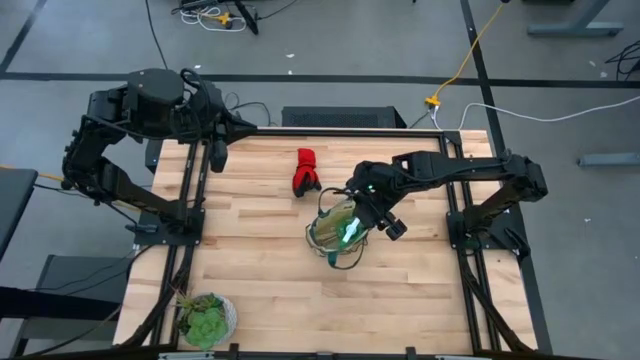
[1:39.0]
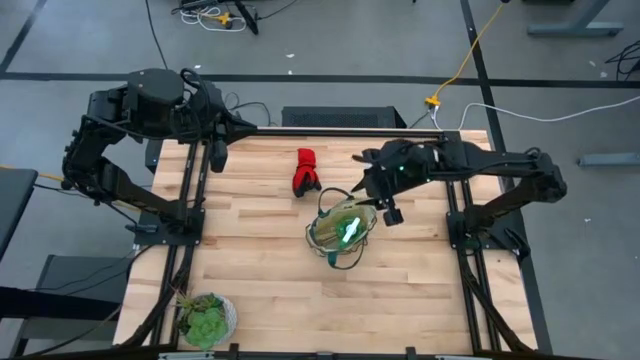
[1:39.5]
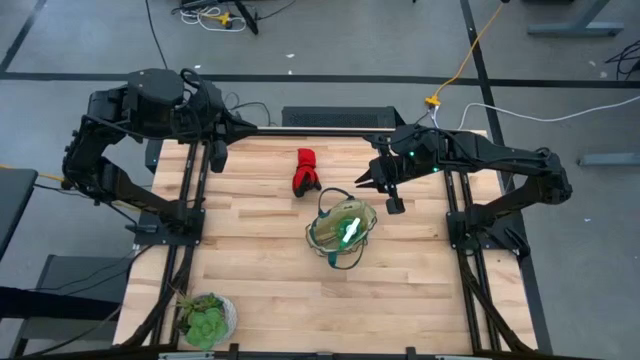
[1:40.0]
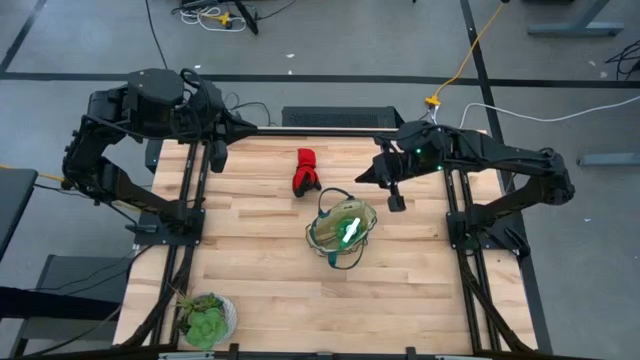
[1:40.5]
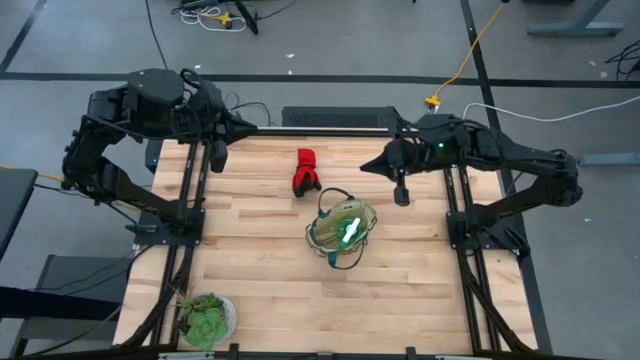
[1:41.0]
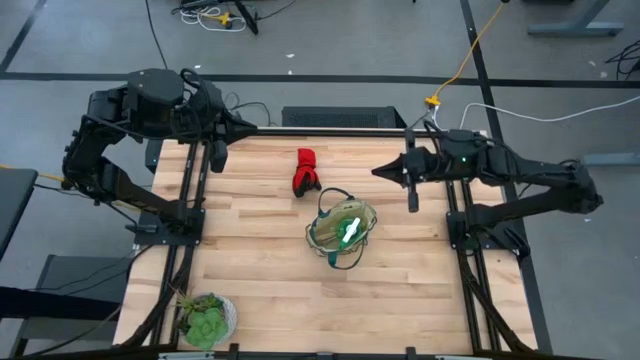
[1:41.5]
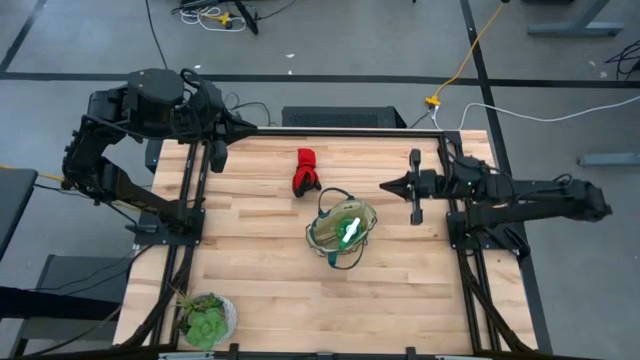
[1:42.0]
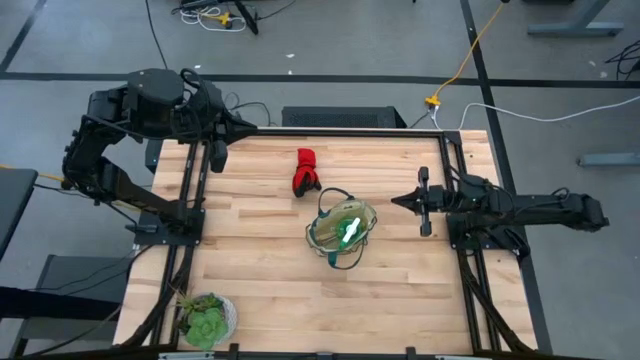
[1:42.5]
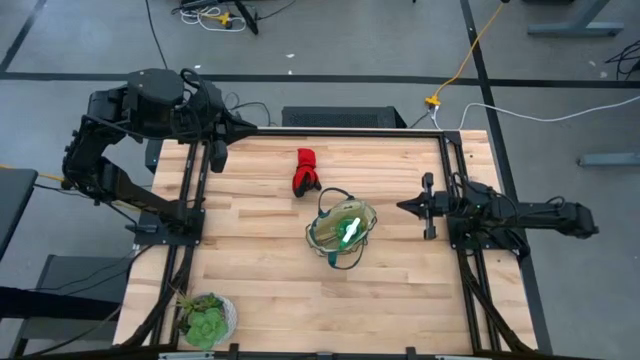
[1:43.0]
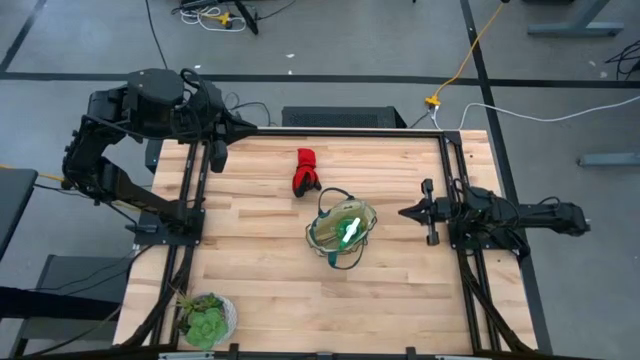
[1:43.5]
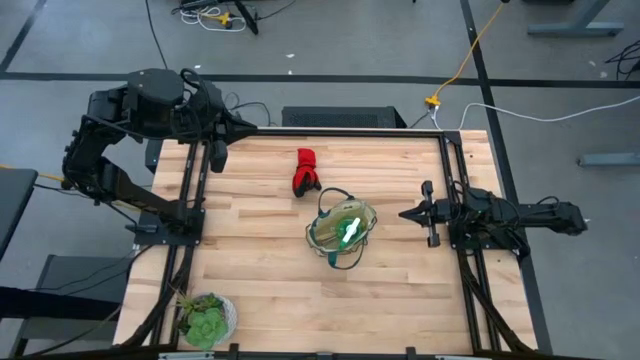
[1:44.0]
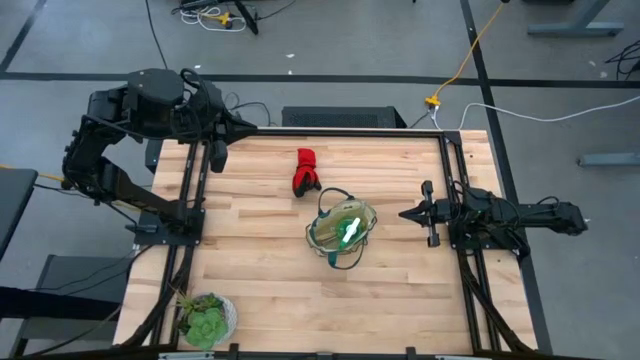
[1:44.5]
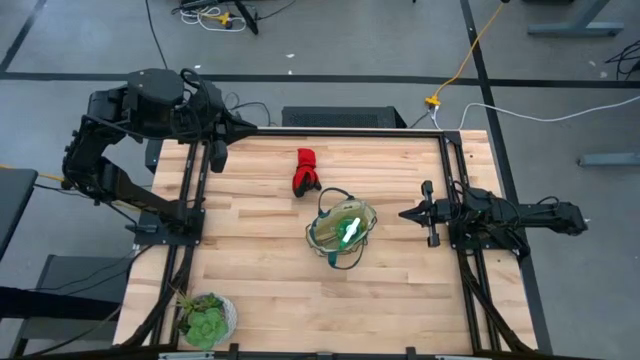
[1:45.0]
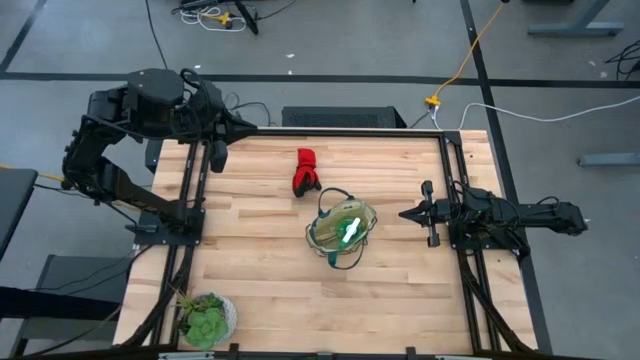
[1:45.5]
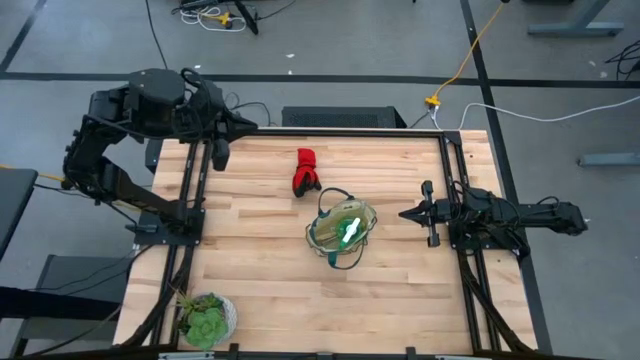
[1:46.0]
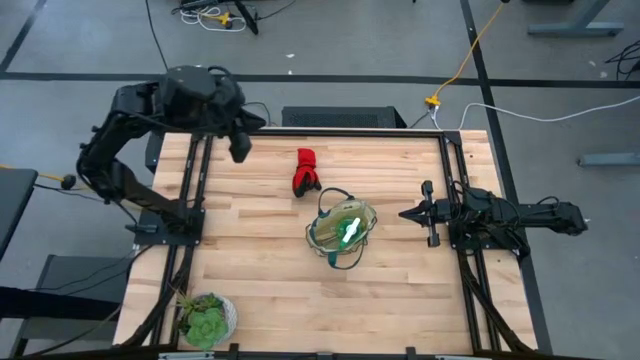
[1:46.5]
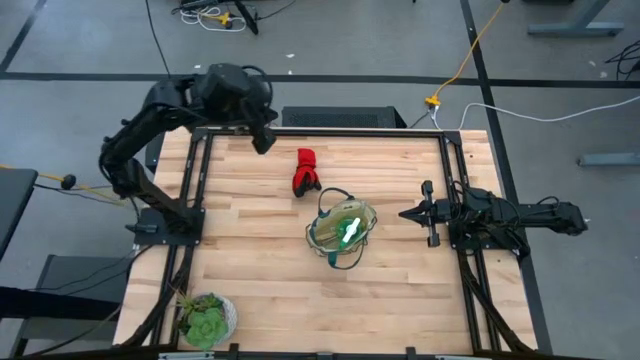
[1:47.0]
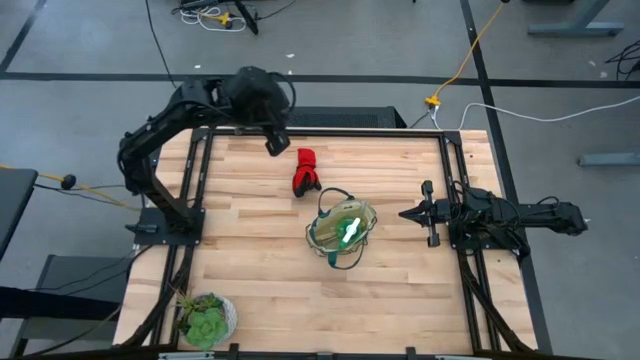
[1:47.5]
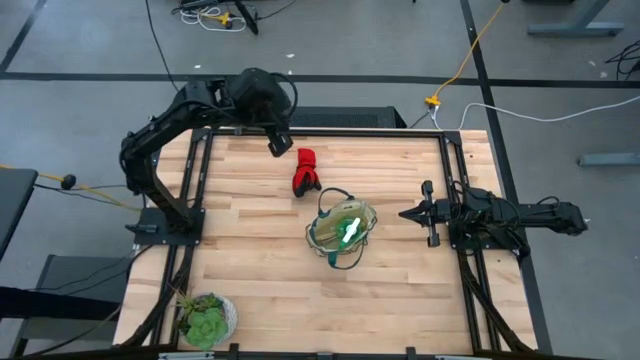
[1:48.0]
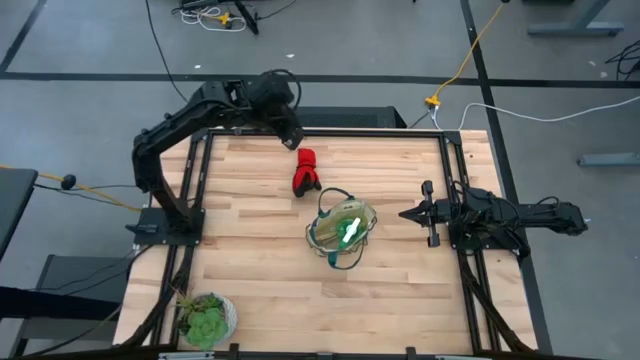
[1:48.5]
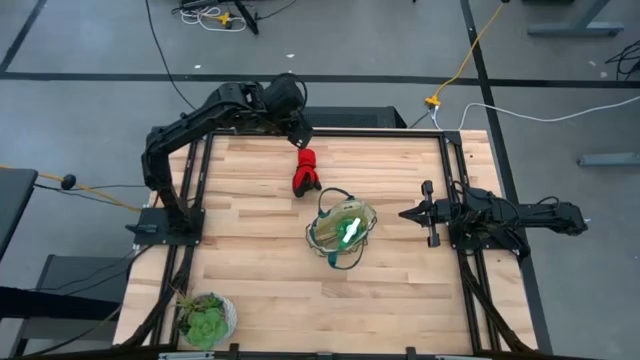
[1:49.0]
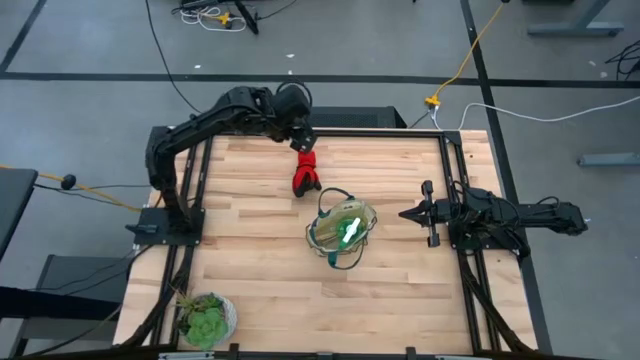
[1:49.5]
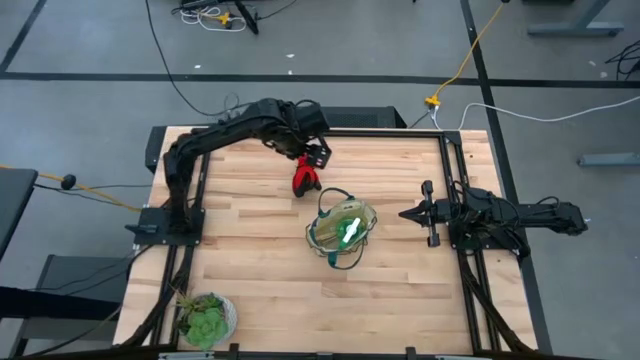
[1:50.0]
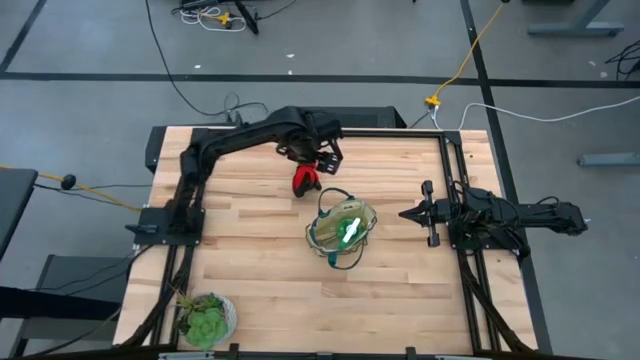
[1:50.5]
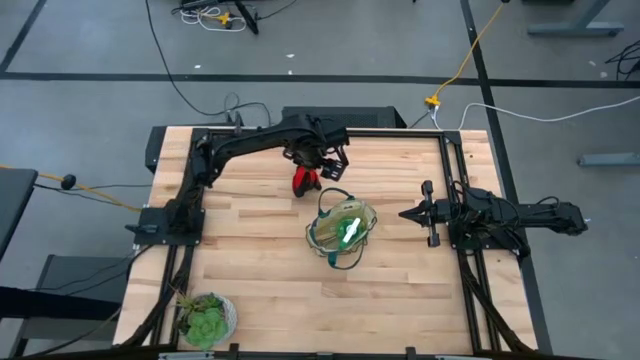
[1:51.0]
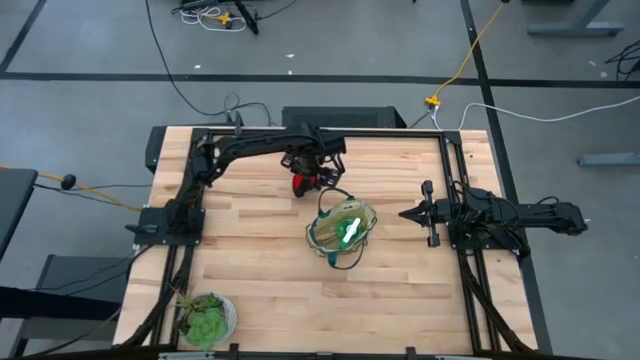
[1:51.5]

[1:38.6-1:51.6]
Task: Pick & Place Garden tools in Gardening bag
Put the red gloves into the light brown and green gardening bag

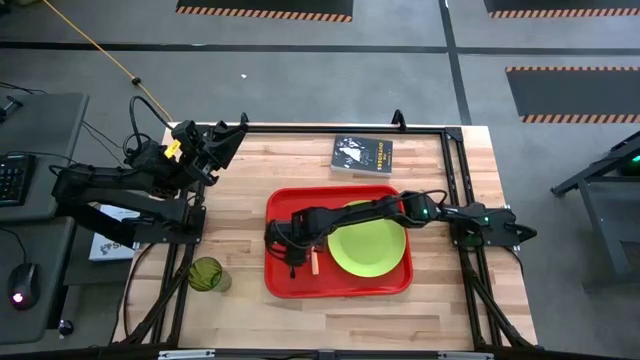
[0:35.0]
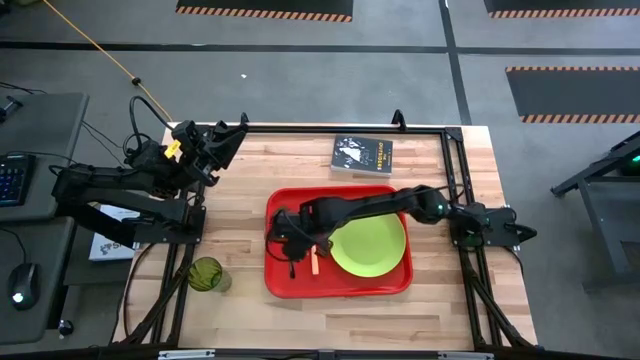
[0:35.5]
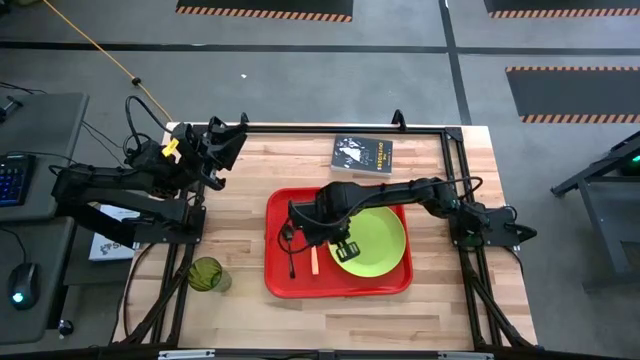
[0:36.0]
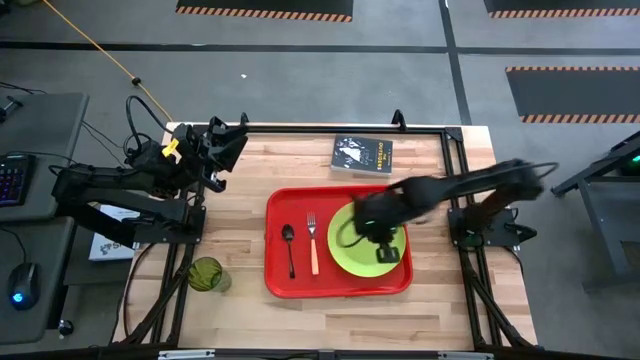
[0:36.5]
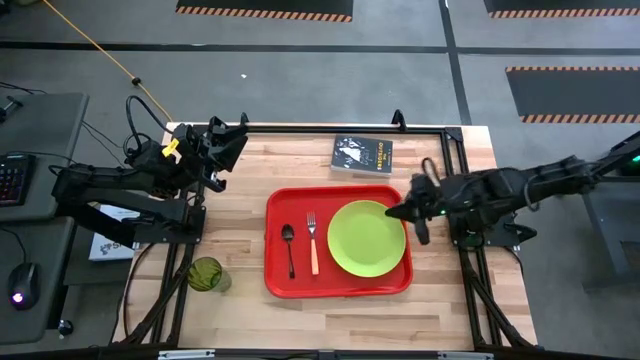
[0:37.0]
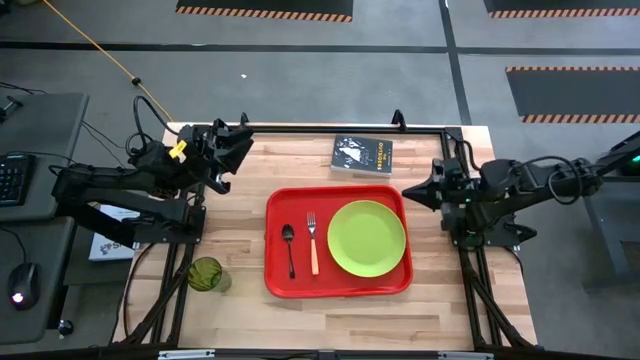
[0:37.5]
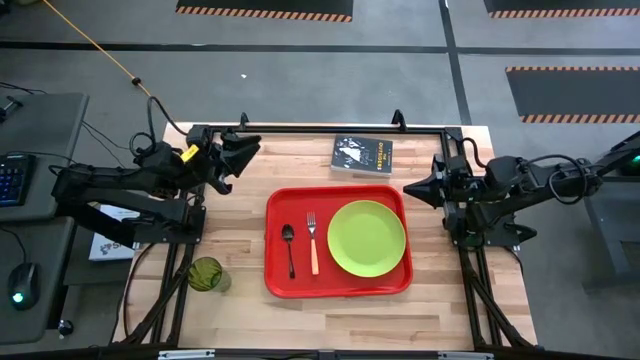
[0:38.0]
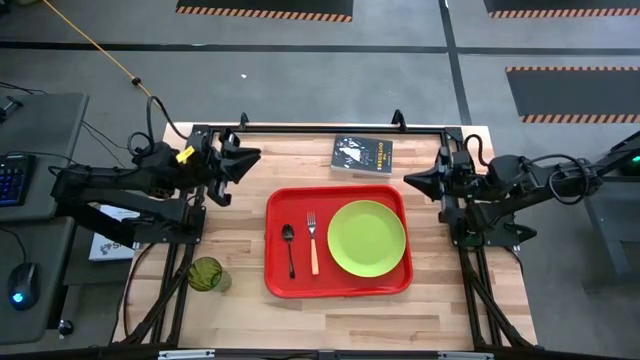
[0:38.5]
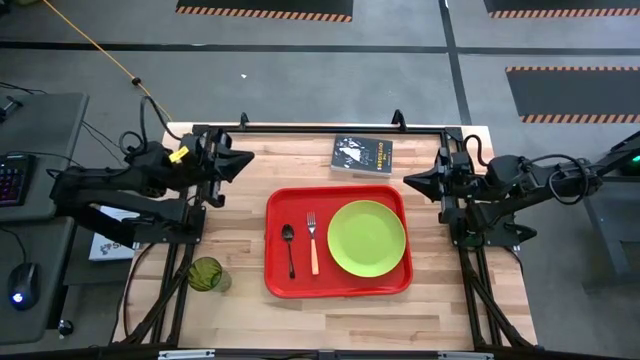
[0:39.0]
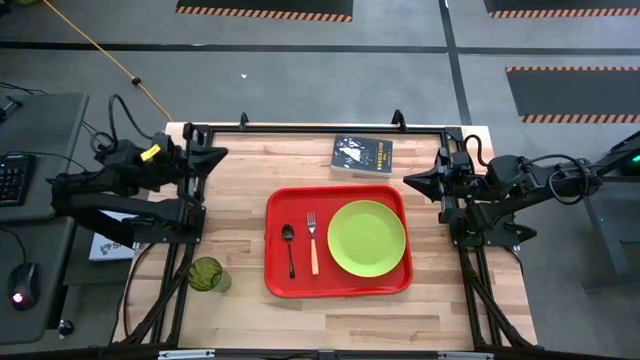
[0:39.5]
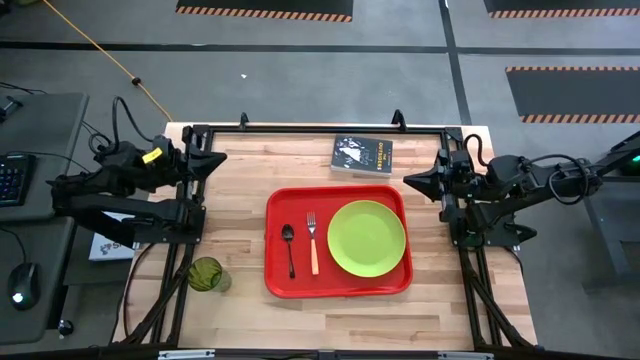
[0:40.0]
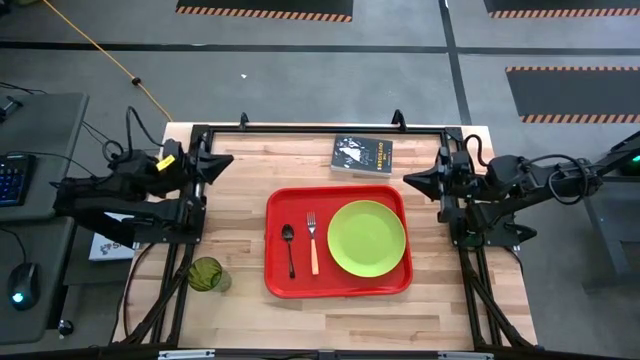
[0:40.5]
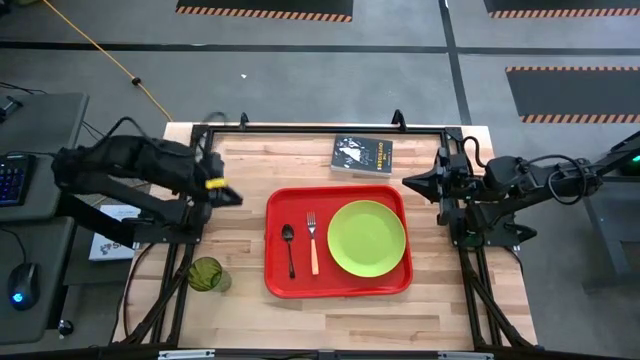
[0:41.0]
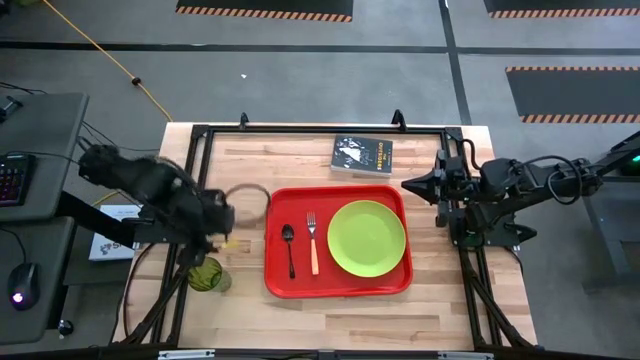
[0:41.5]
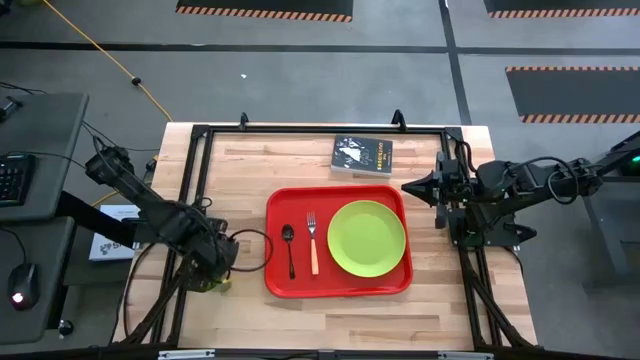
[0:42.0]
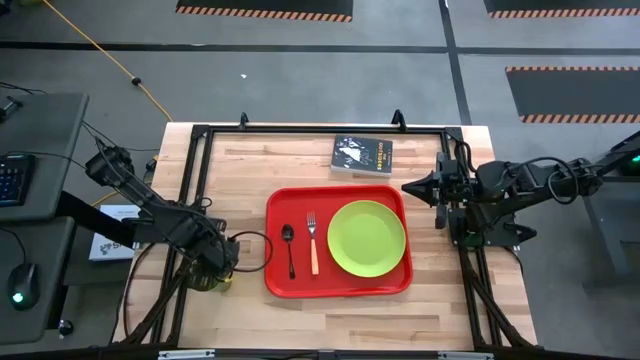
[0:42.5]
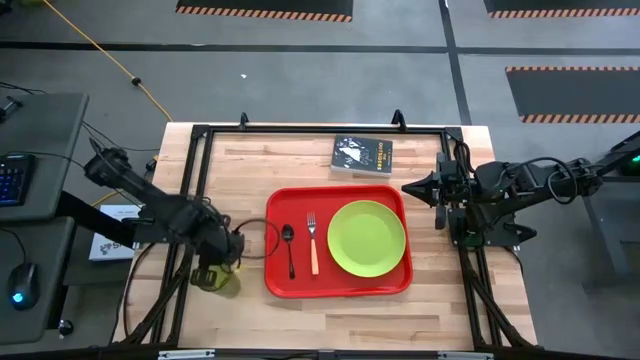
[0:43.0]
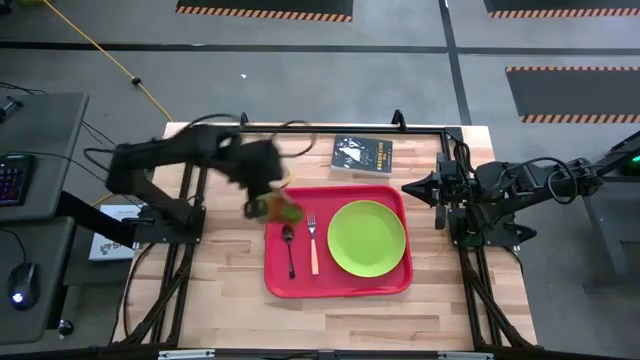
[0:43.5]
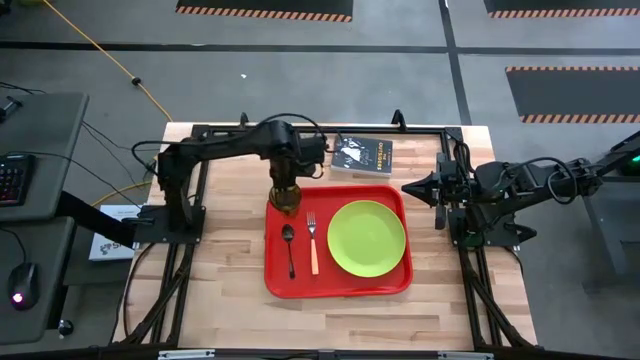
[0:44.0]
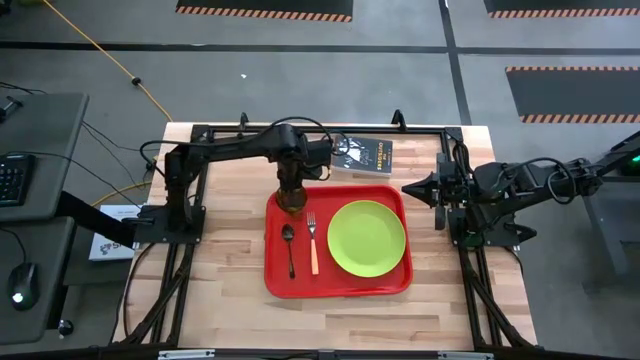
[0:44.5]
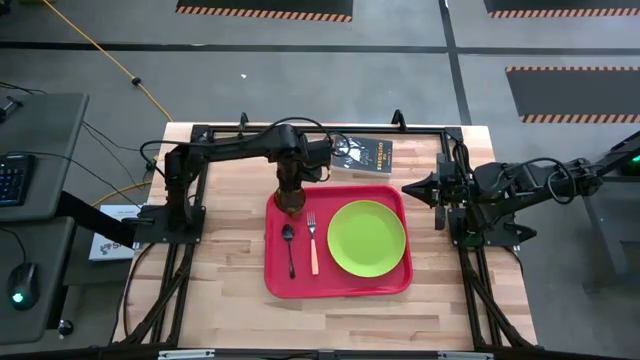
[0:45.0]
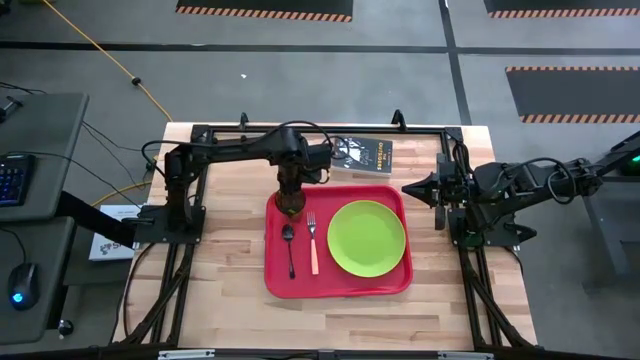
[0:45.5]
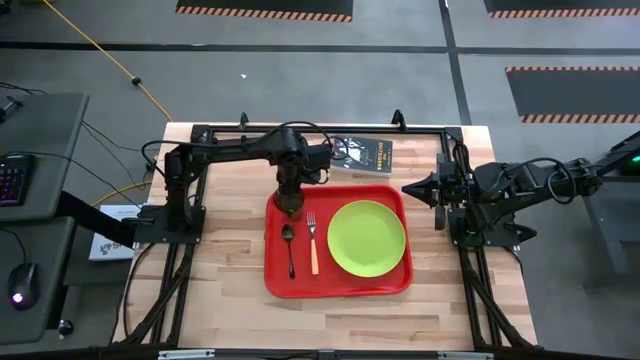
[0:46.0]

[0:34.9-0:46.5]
Task: Pick and place plate/cup/fork/spoon on tray
Put the green cup on the red serving tray to the top of the black spoon
